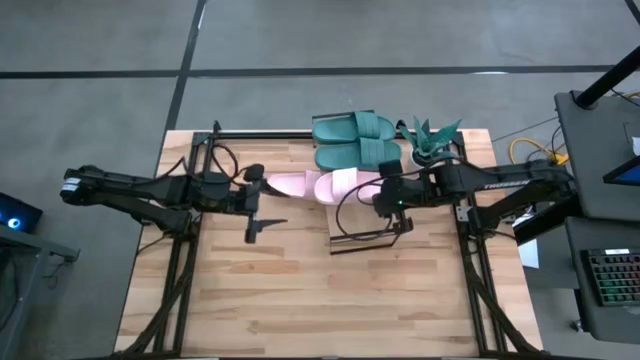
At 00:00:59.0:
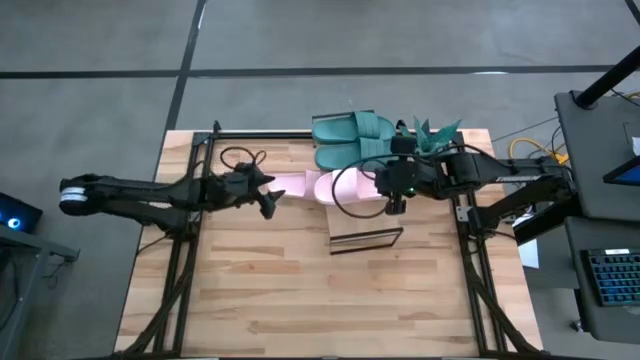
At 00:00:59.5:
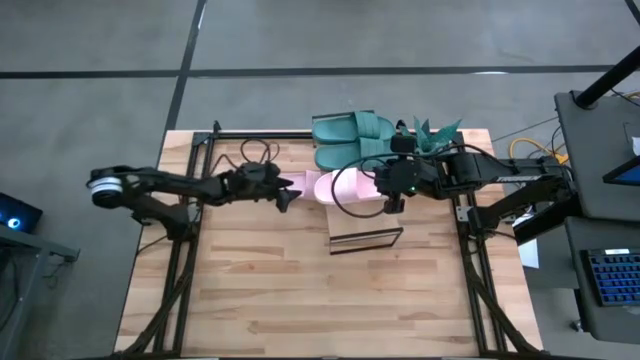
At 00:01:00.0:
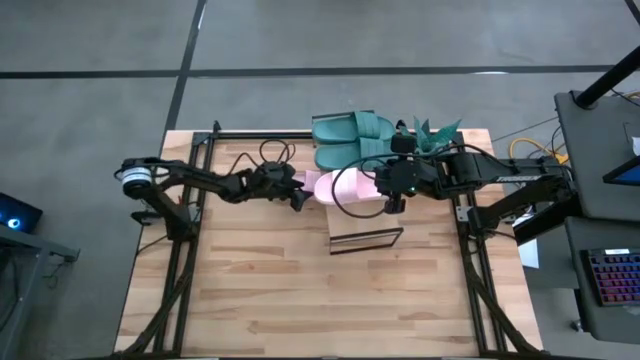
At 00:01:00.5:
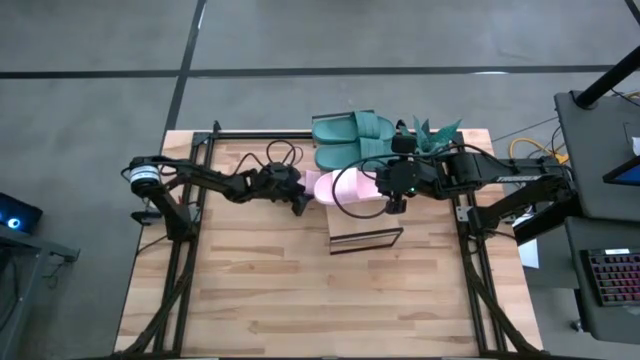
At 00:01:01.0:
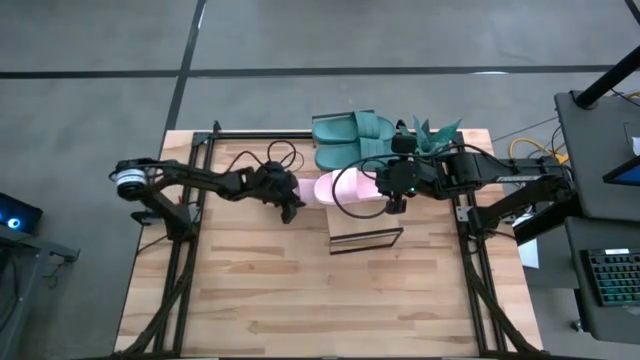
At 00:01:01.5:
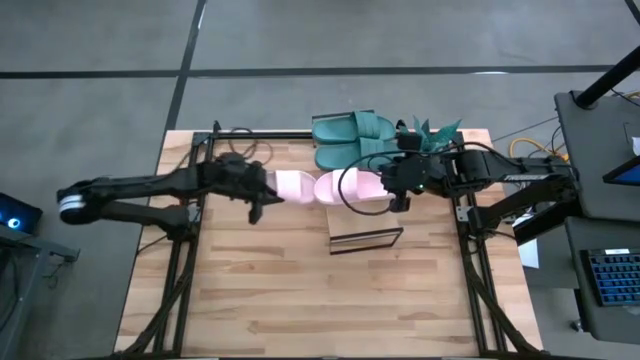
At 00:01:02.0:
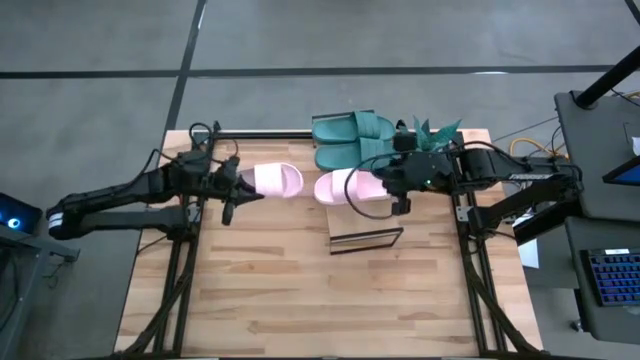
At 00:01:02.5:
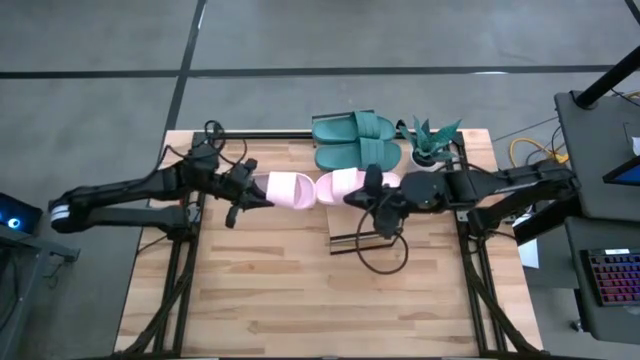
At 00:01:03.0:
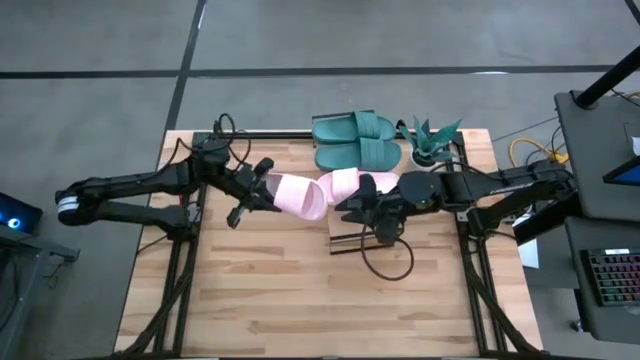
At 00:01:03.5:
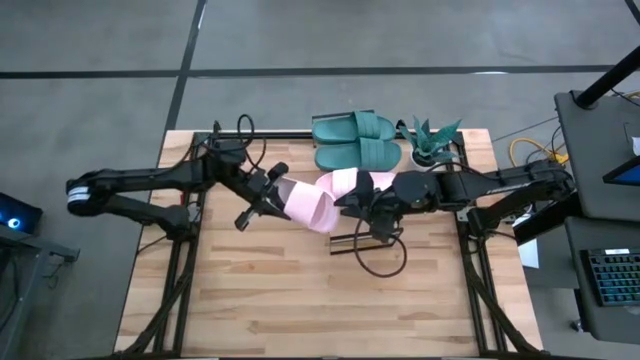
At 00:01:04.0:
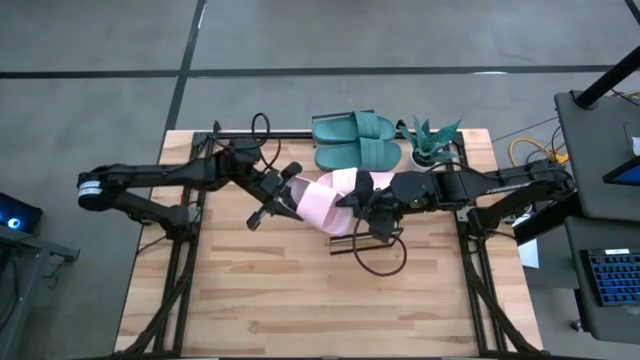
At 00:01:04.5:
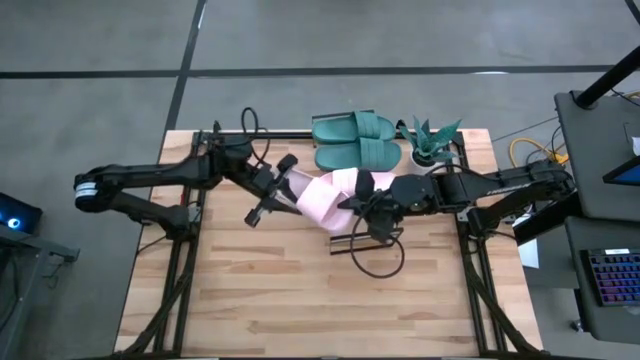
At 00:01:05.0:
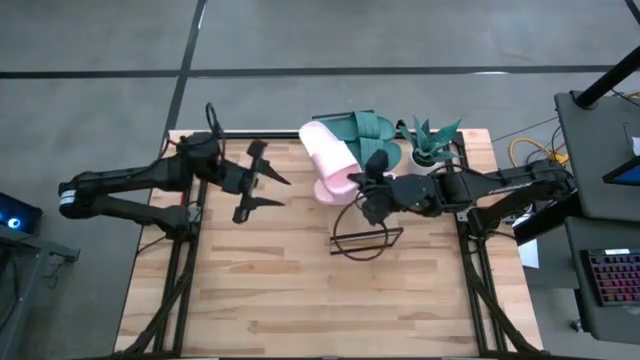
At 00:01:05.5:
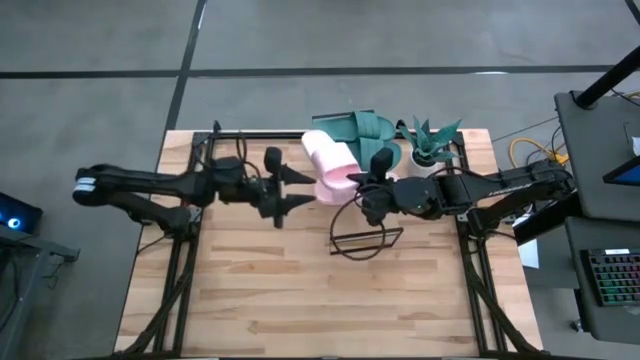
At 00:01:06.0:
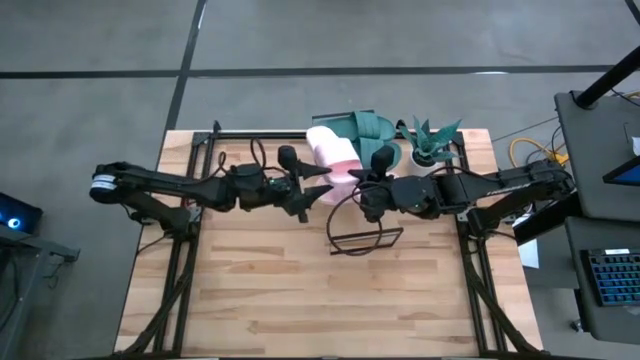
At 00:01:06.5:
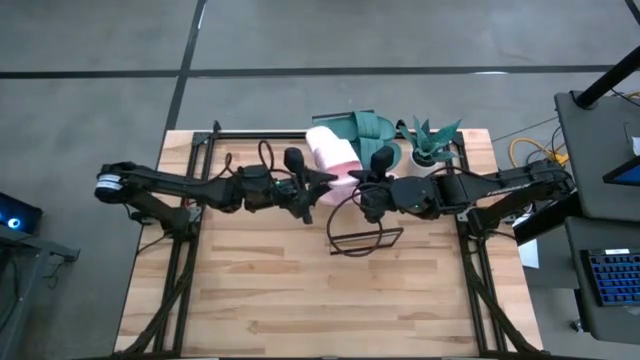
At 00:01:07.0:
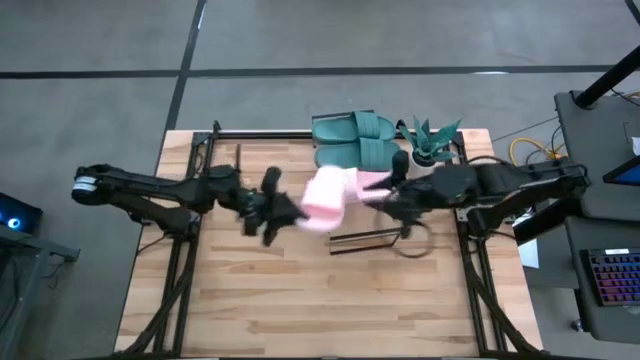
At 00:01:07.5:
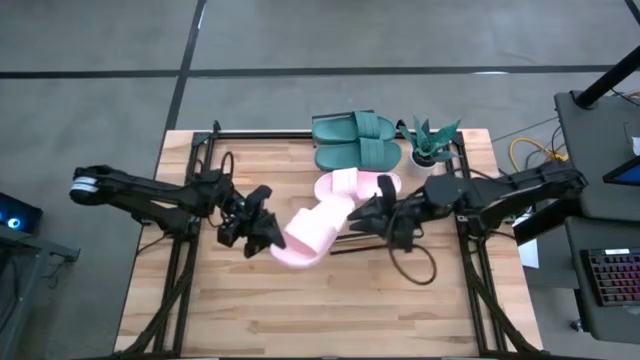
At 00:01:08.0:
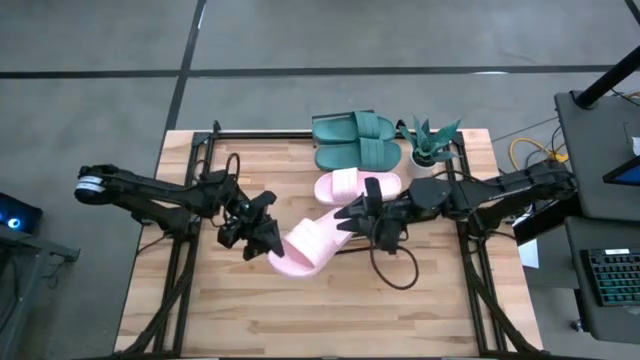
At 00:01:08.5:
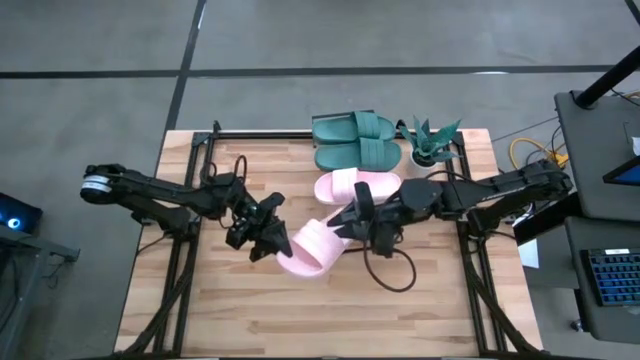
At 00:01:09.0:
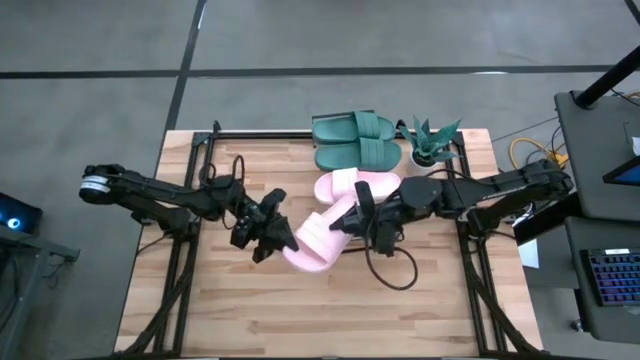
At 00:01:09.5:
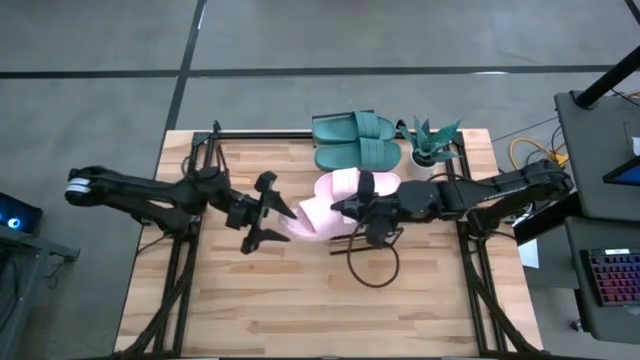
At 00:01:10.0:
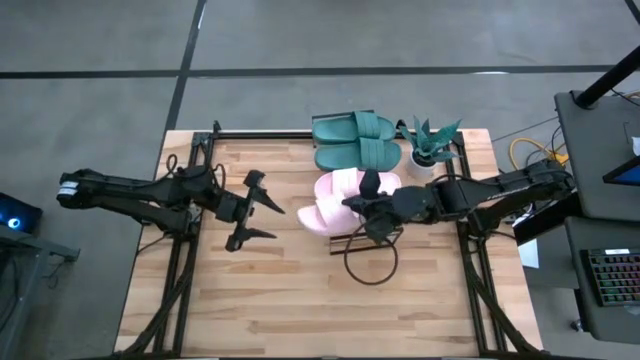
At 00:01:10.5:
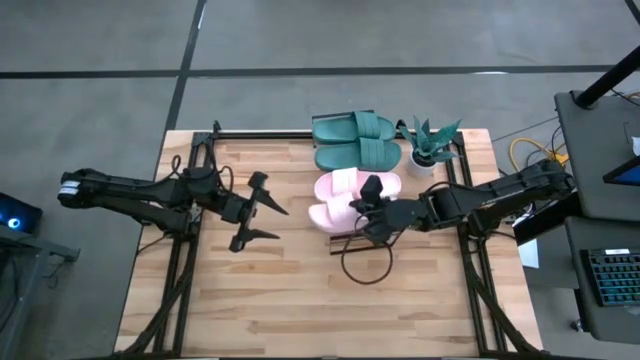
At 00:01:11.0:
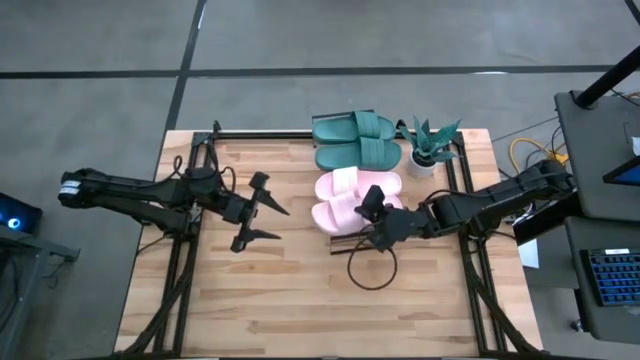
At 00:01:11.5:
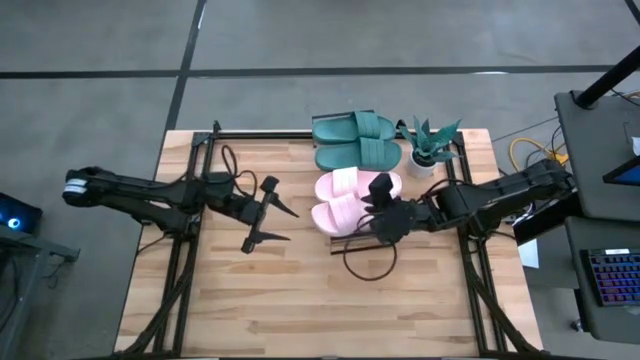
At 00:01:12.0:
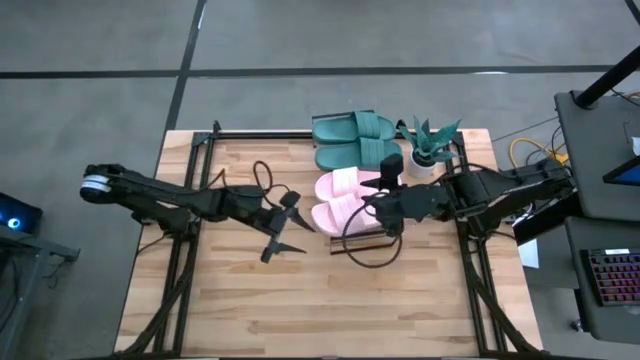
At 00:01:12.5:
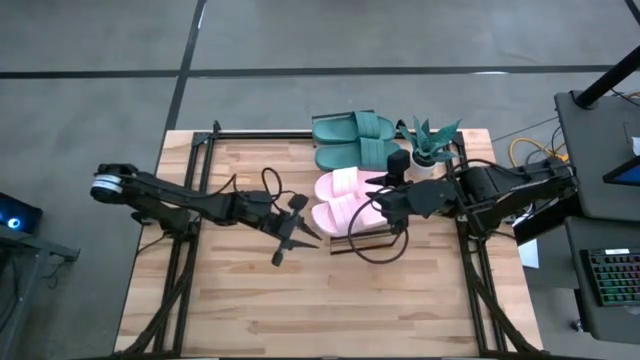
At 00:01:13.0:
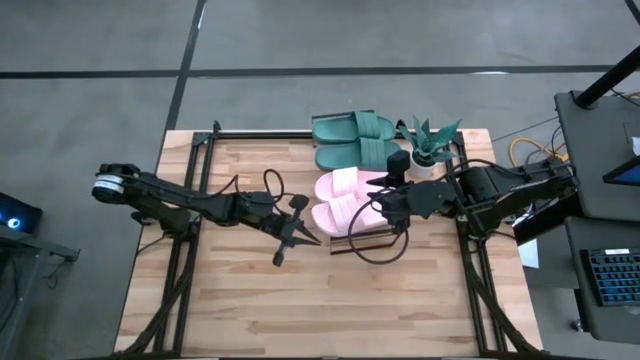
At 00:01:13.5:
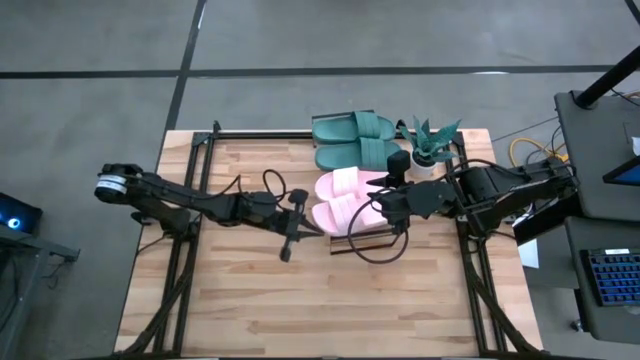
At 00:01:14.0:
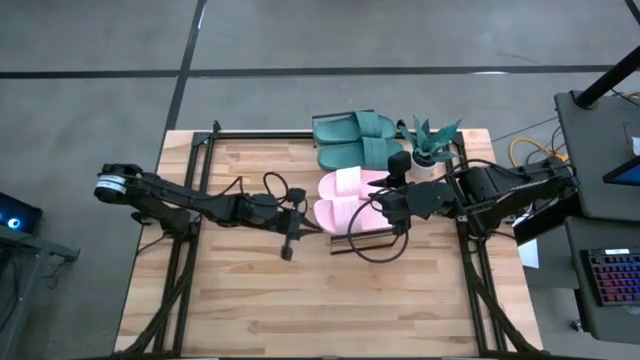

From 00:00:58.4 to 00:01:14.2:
Task: Pick and place slides into the shelf
Put the pink slide on the shelf
